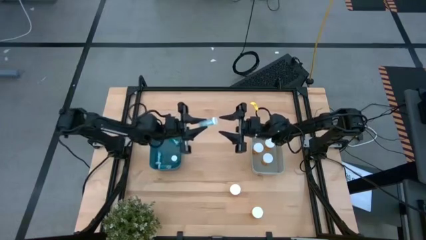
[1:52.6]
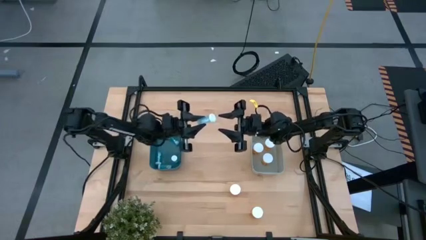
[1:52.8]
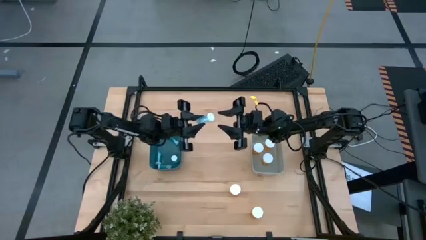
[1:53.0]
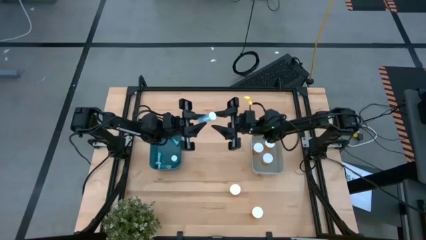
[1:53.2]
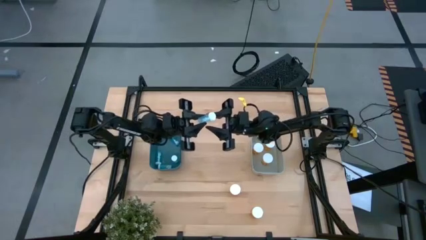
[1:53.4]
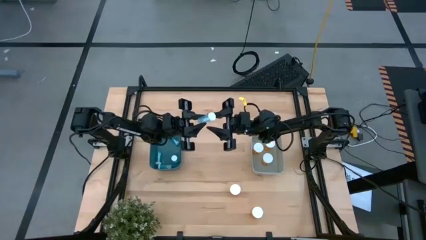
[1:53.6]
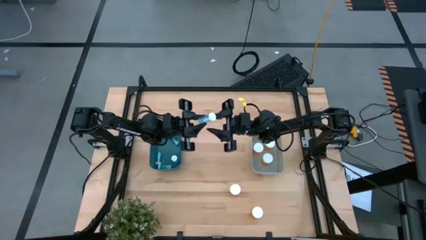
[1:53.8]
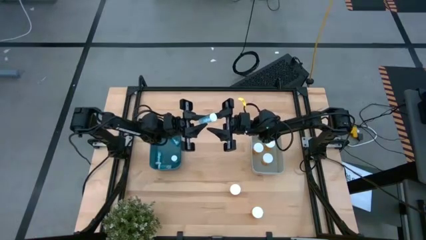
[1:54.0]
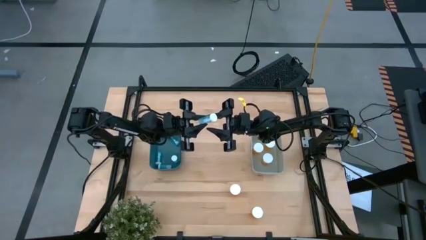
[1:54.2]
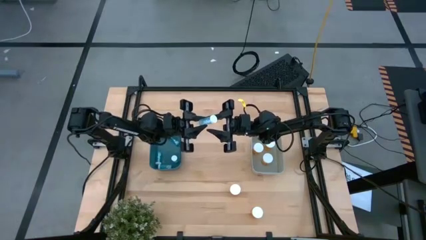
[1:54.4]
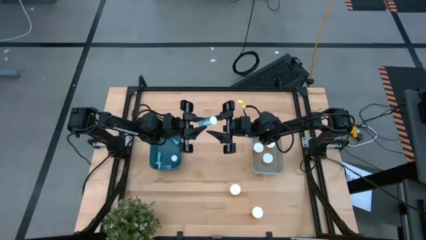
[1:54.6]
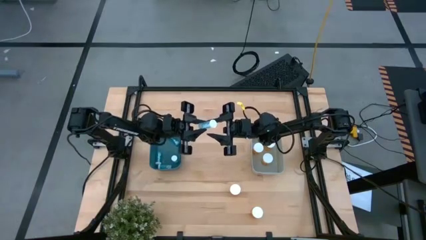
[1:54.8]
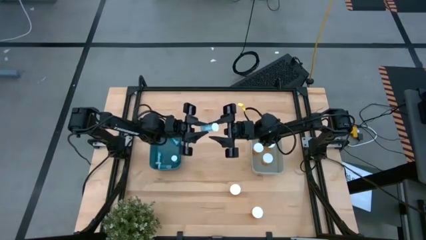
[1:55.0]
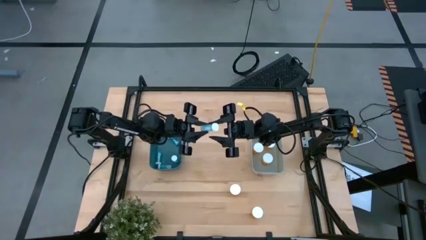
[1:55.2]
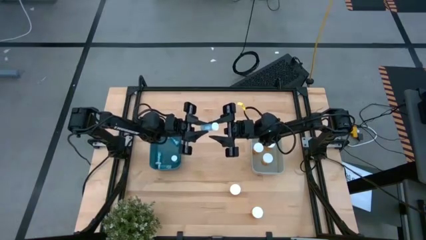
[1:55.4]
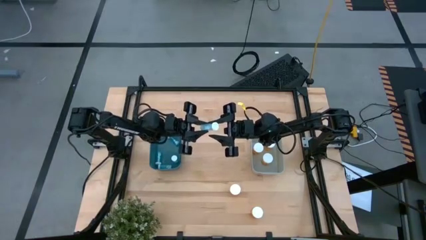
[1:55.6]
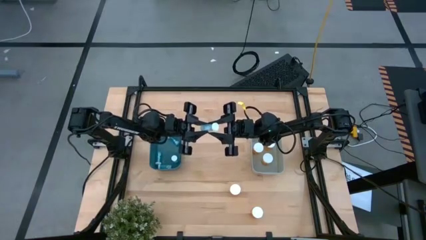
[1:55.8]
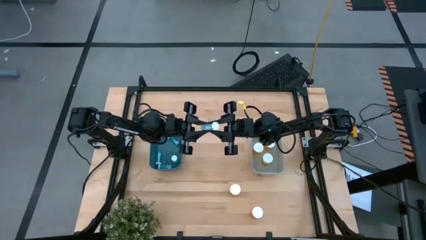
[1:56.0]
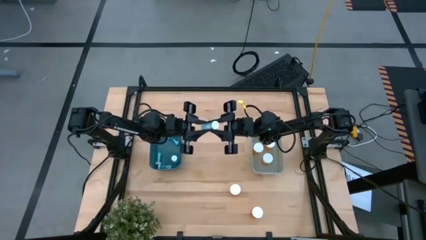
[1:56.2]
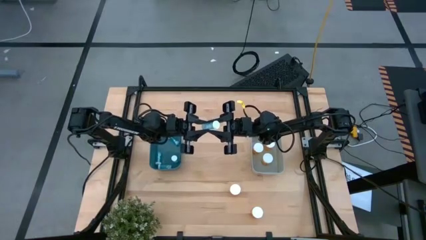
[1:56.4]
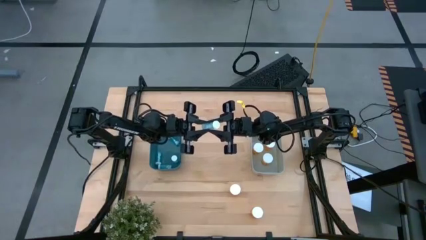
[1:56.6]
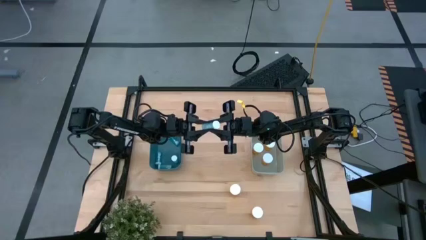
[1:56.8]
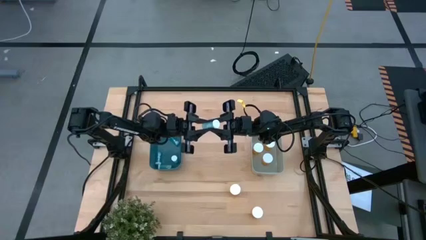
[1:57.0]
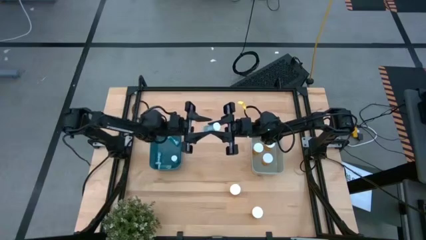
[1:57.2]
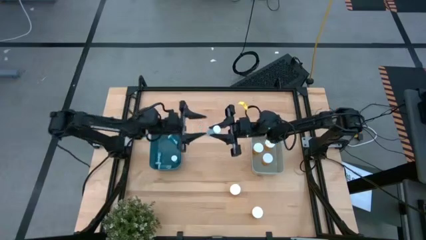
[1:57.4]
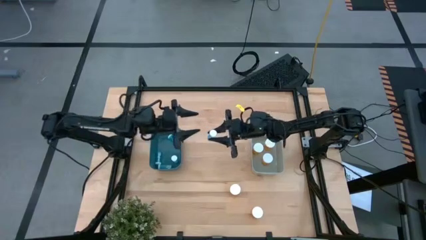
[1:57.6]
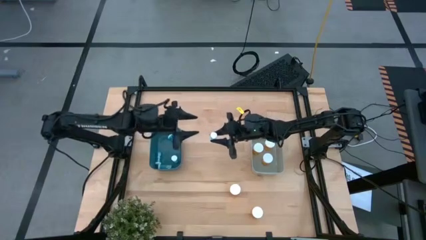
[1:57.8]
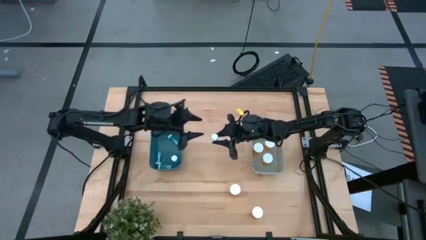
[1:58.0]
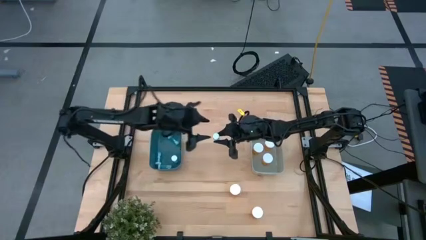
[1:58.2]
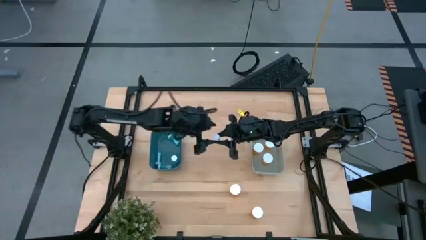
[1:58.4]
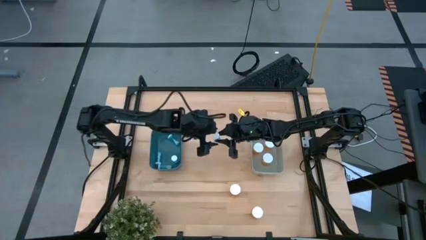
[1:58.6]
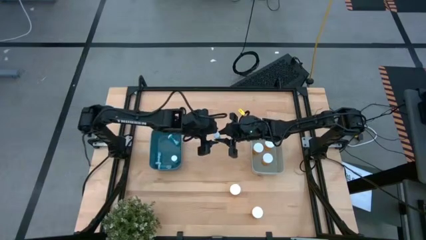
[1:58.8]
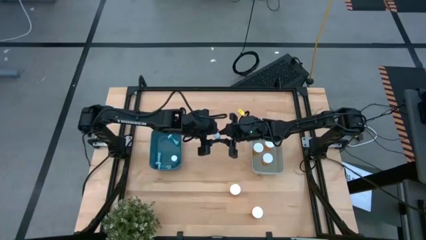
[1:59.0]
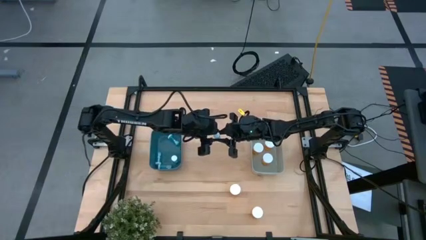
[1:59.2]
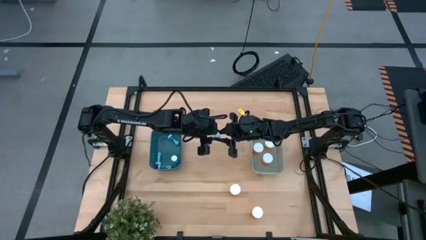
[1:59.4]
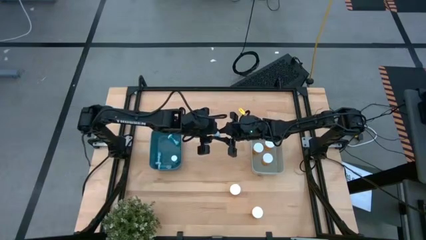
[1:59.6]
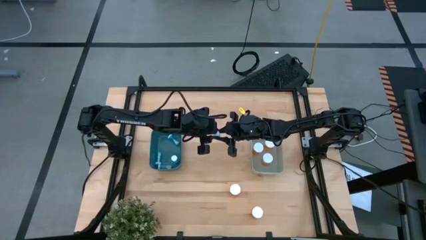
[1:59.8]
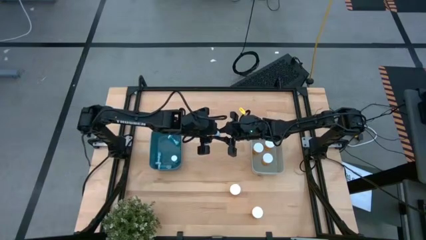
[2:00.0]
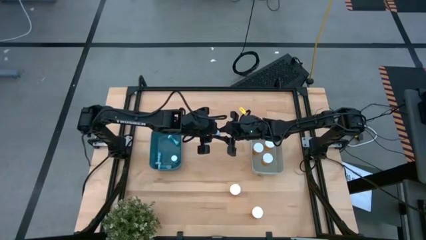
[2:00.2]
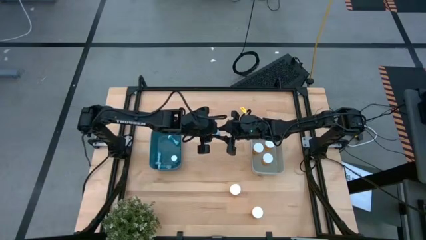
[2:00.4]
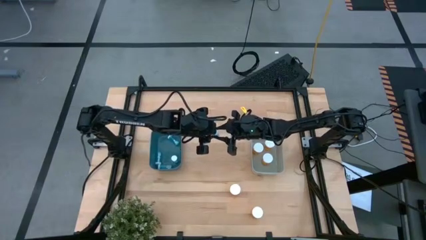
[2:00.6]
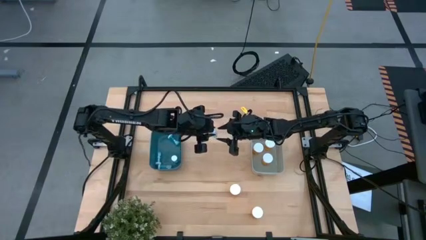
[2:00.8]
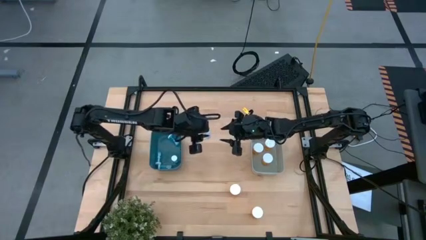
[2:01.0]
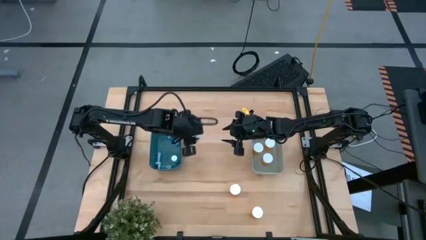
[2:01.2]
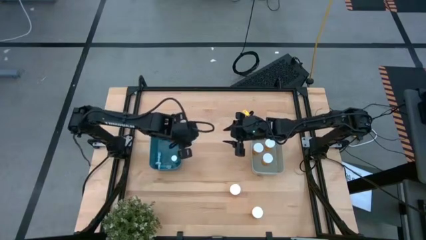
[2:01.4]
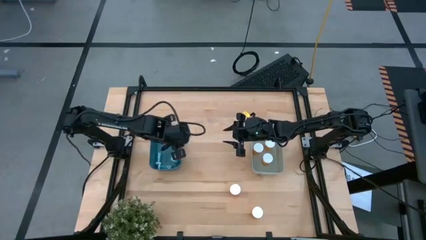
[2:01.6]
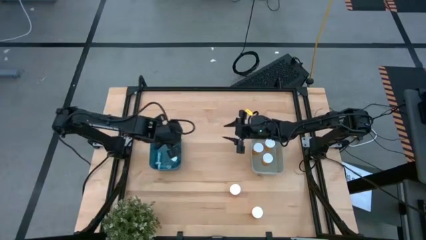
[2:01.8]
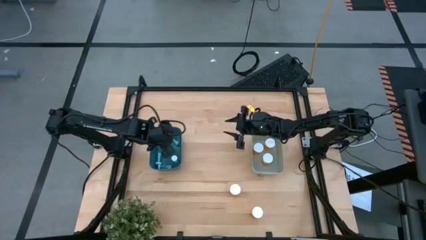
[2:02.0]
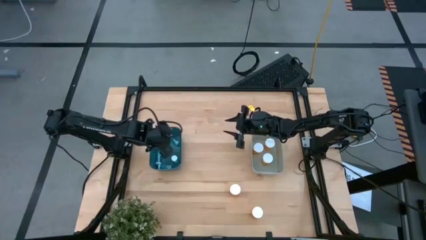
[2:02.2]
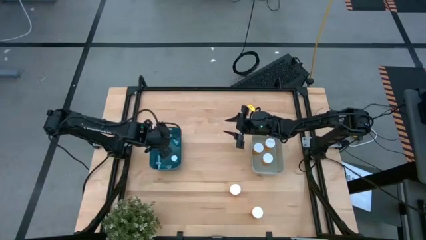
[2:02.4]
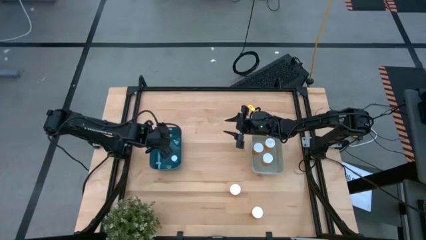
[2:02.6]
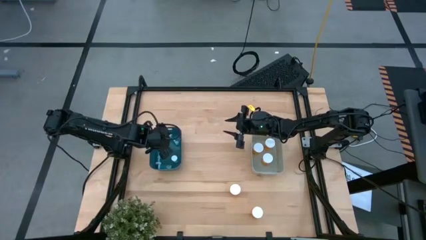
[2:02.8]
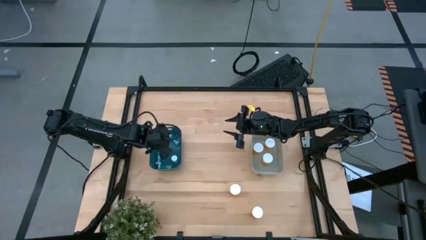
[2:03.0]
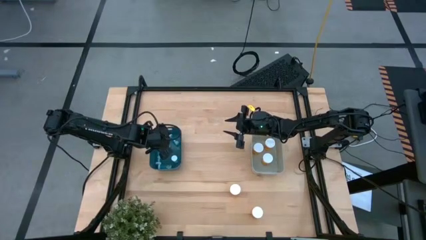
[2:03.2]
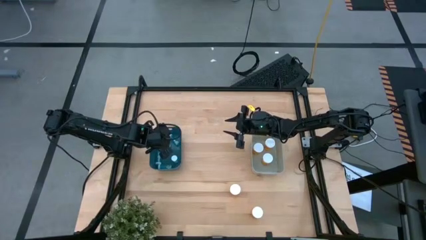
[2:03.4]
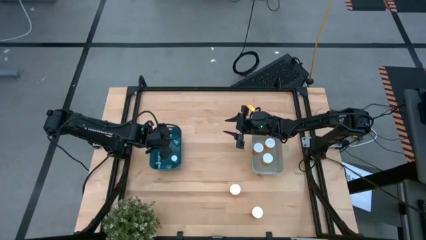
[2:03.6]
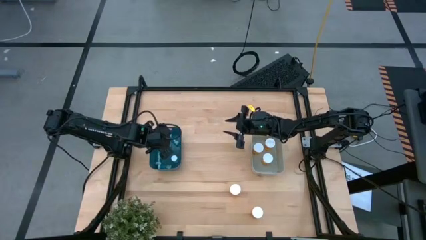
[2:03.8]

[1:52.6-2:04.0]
Task: Pick and place medicine bottles into bin by pill shape (circle, oval)
Adjust the blue pill bottle

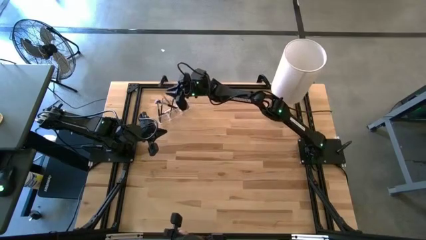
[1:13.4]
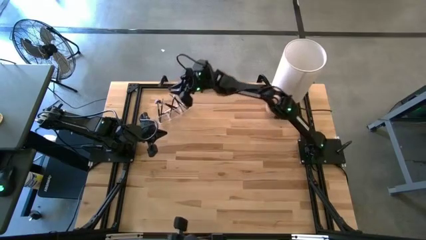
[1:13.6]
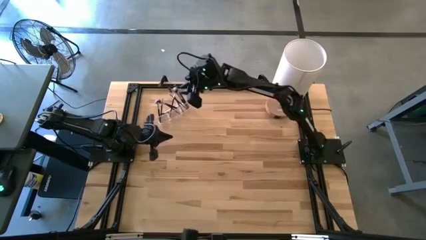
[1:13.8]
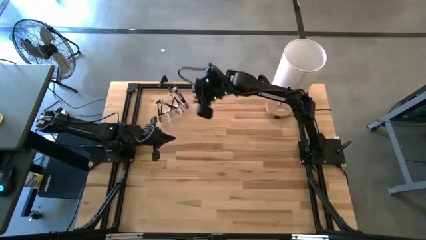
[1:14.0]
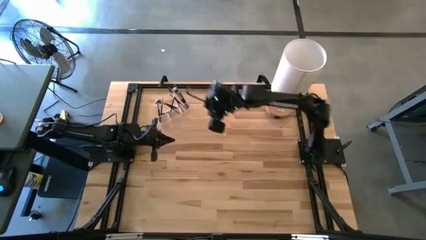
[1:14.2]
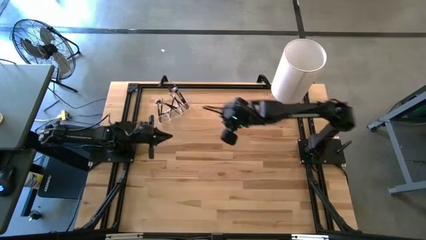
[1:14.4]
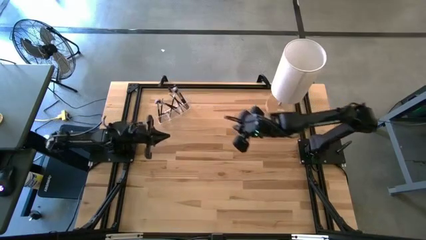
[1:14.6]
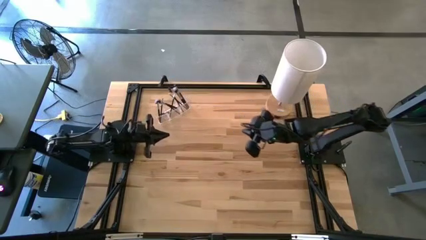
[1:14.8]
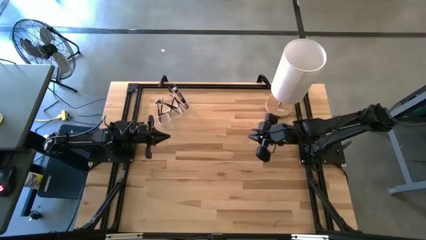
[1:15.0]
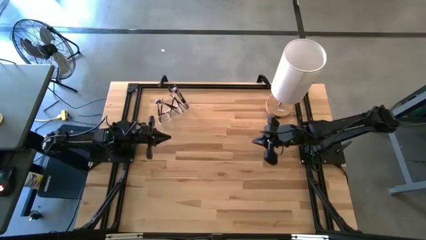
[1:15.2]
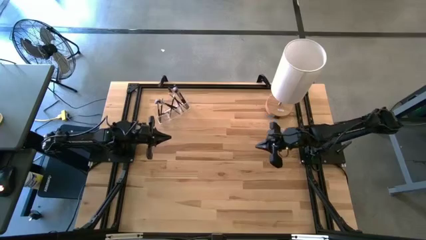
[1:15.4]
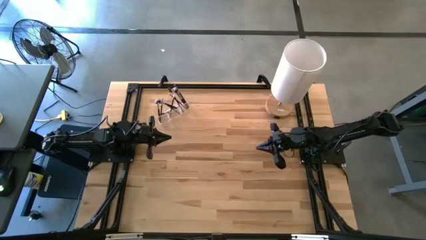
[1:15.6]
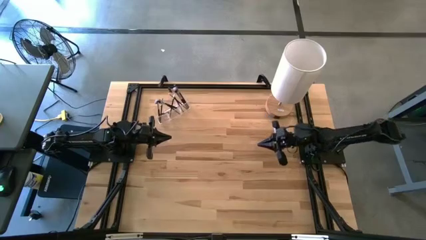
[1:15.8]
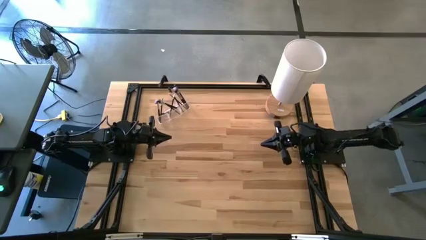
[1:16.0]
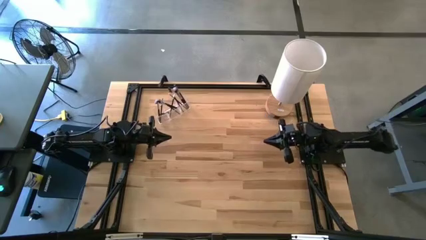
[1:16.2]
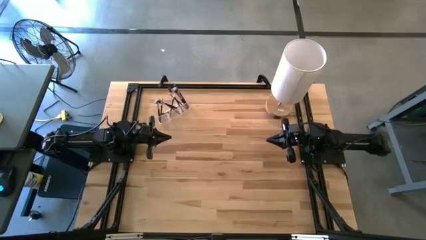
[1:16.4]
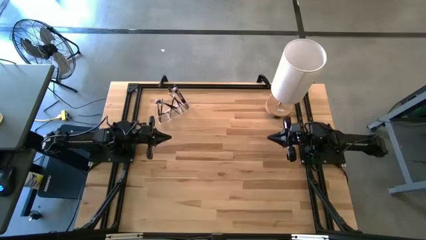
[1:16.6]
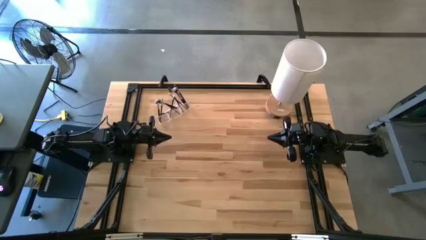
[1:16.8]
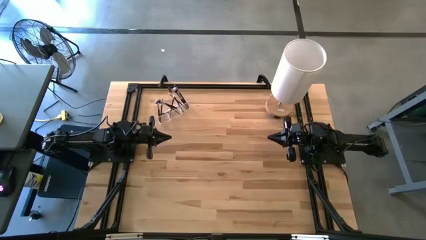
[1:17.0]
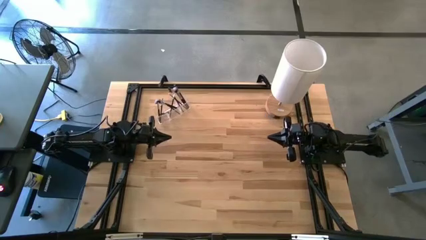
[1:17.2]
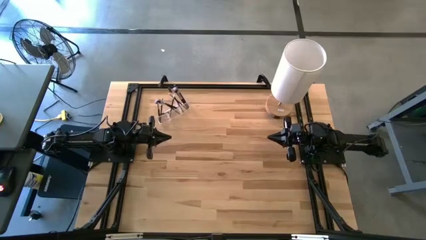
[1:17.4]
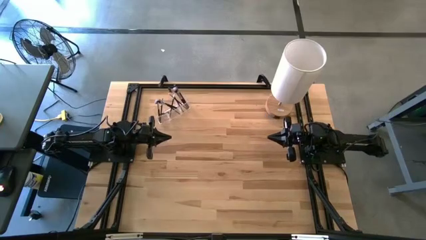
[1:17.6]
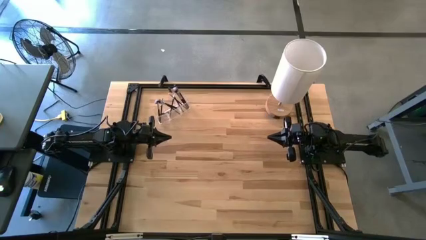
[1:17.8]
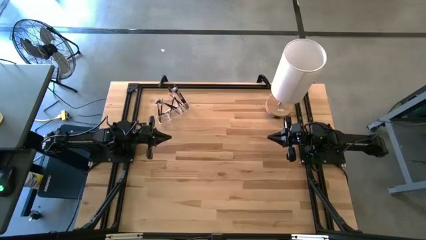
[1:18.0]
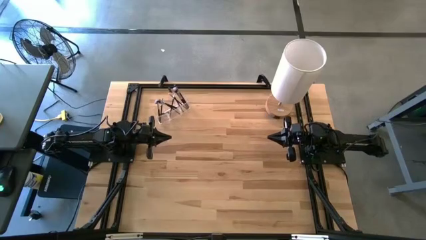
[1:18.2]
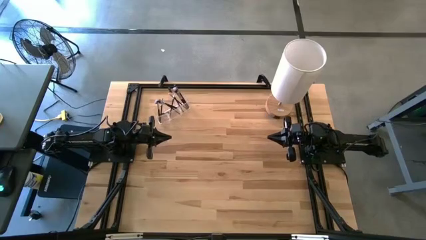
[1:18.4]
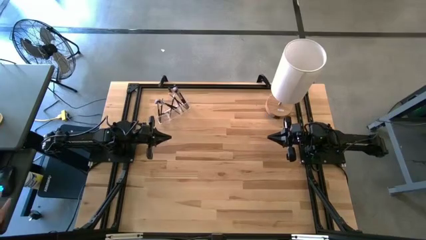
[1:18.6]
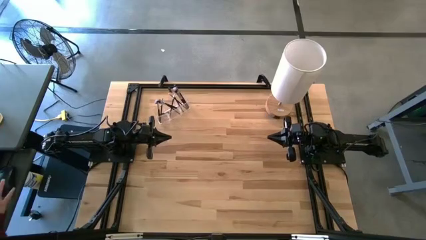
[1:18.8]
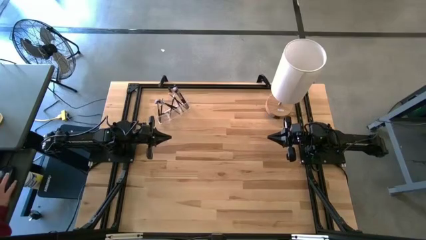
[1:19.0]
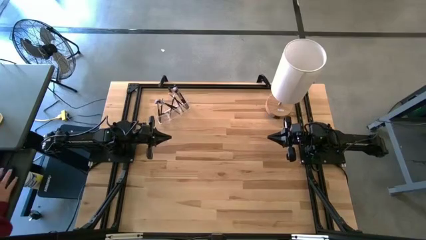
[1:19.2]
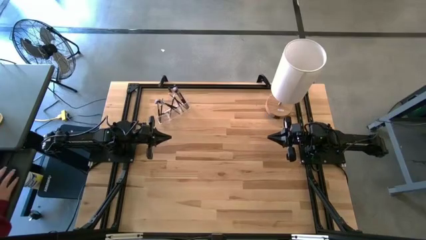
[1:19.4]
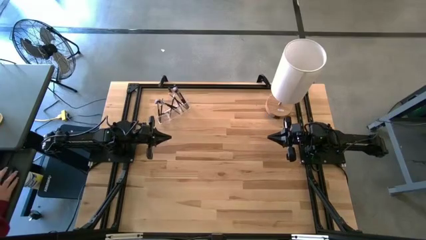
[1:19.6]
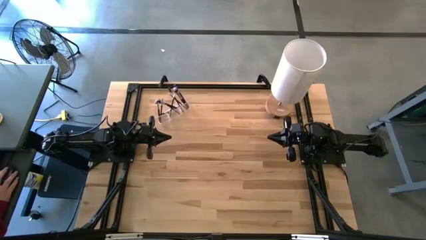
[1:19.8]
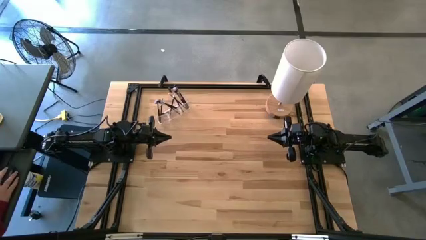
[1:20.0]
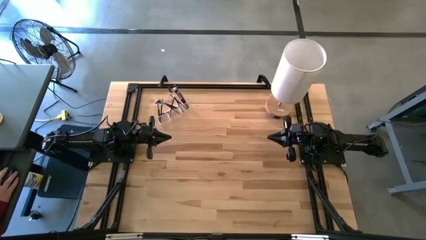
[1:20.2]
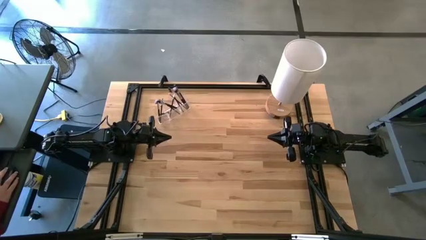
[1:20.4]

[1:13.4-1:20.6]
Task: Put items in baskets/containers
Return to Home Position
